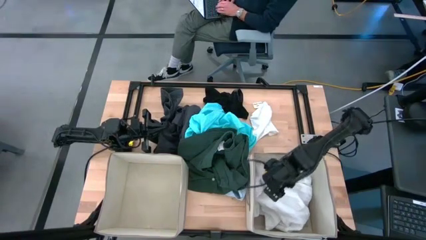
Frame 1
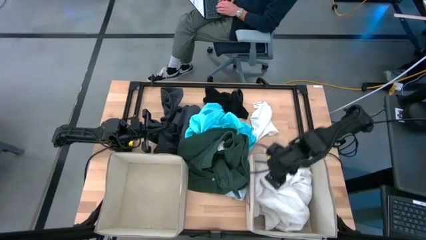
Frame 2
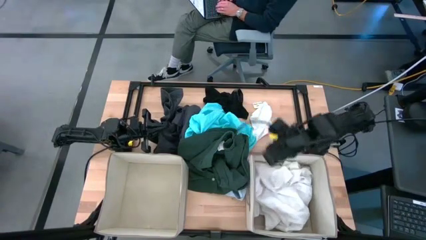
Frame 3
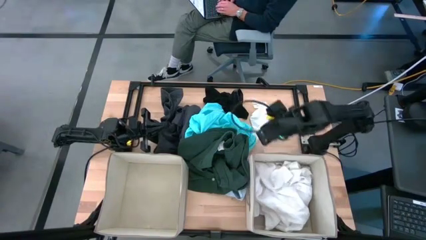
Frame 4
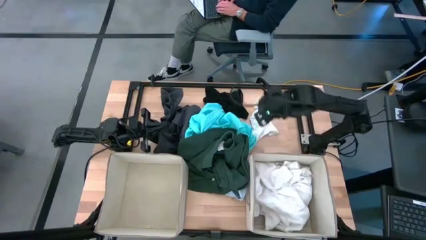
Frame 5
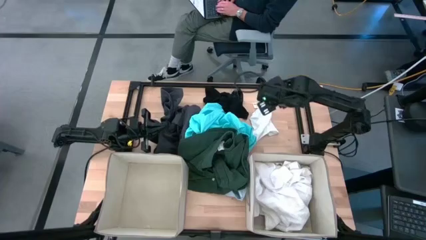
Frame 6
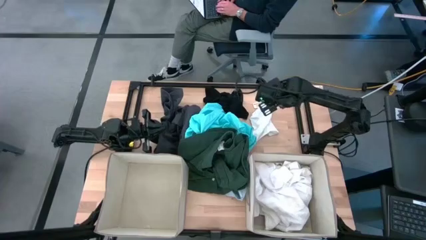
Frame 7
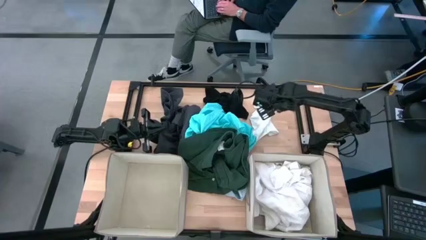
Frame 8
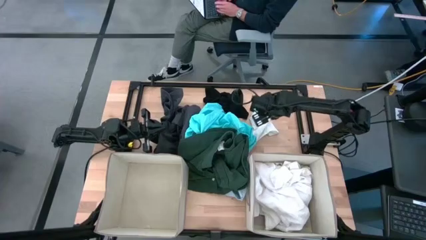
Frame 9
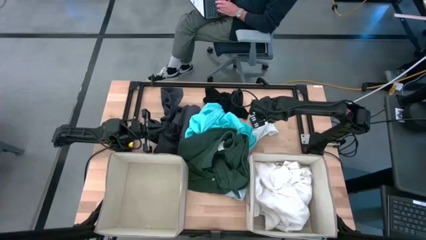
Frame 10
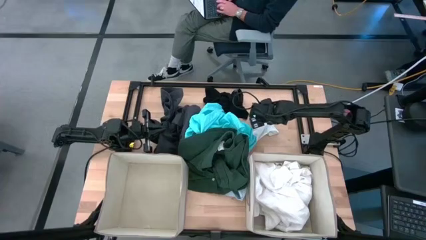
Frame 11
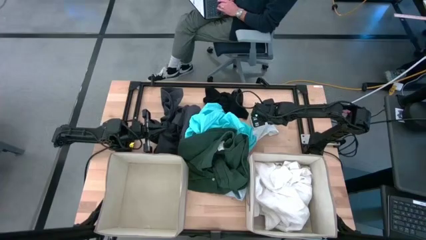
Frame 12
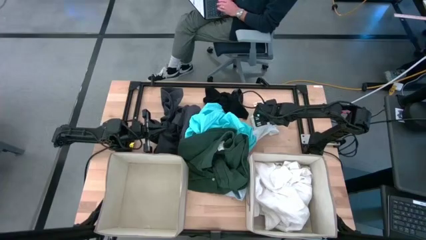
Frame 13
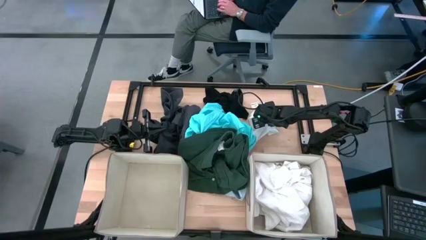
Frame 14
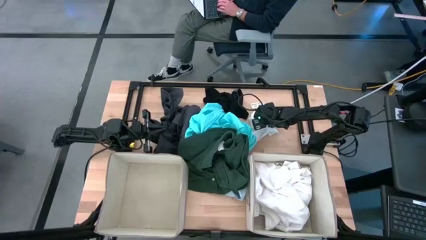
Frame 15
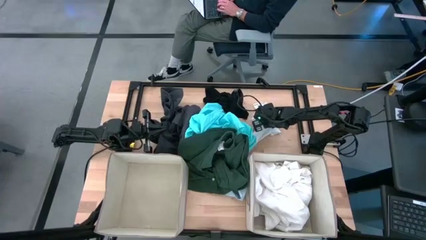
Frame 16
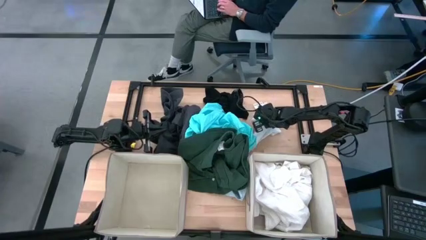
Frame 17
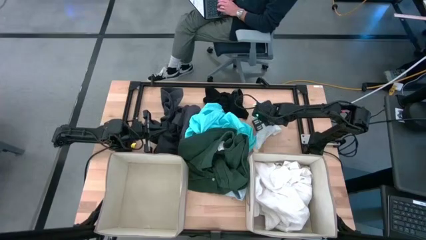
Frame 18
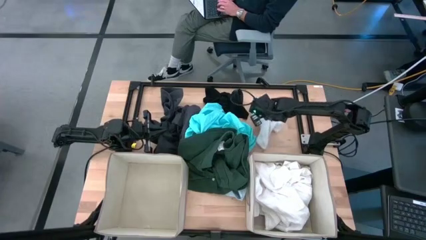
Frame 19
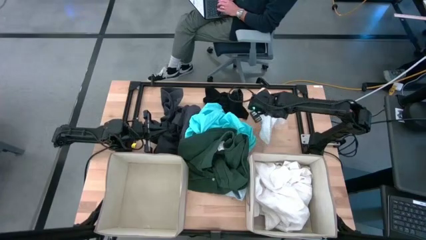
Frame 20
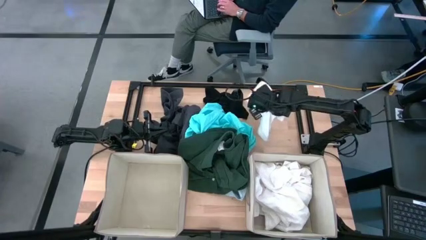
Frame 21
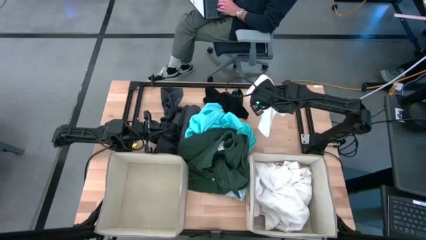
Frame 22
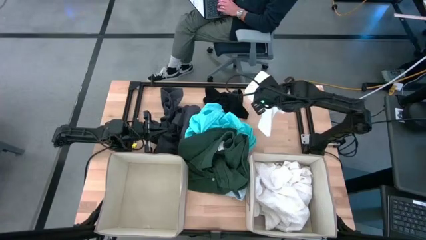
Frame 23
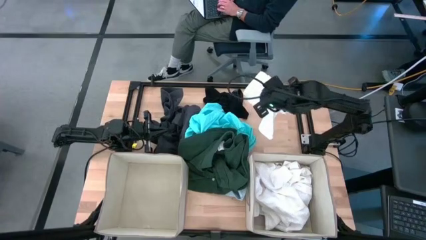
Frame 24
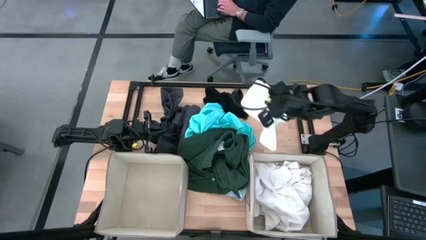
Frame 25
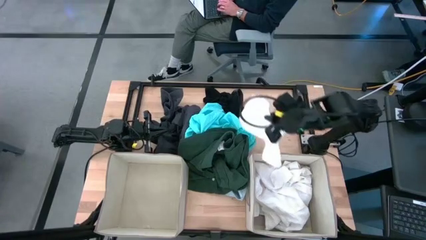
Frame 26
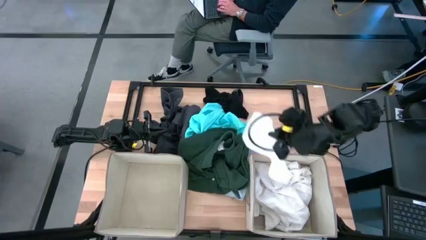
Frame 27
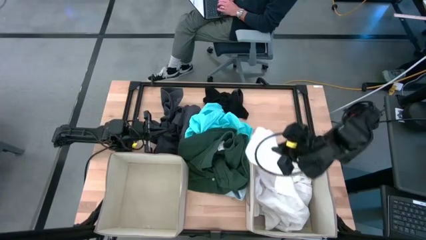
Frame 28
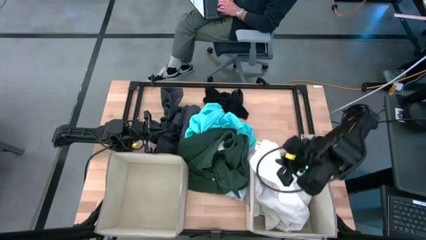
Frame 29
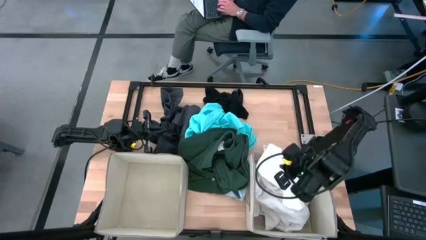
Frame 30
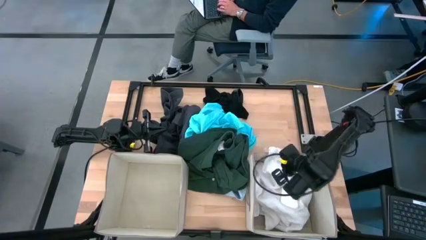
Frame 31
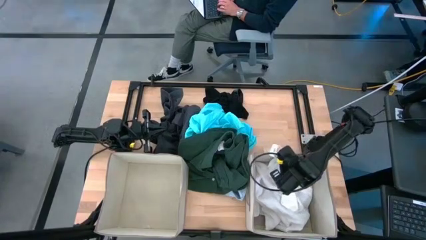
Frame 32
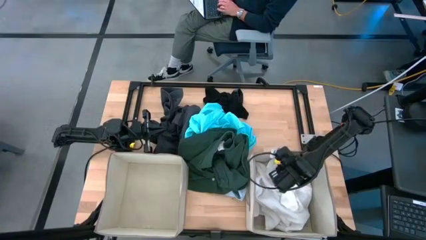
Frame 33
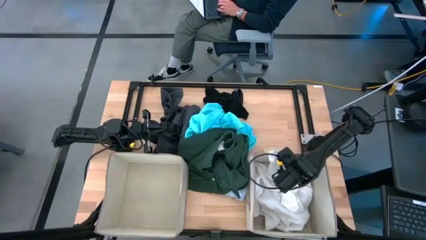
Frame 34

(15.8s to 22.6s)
Task: Sort clothes
Put the white boxer into the right brown laundry organizer

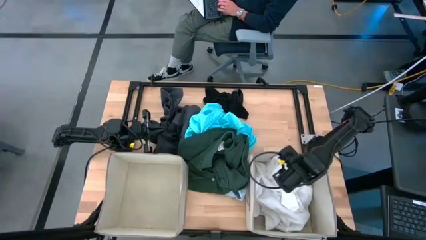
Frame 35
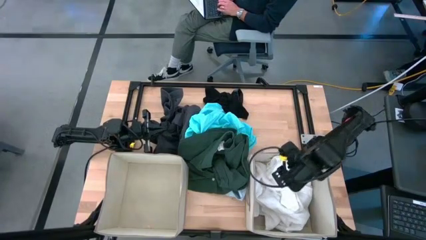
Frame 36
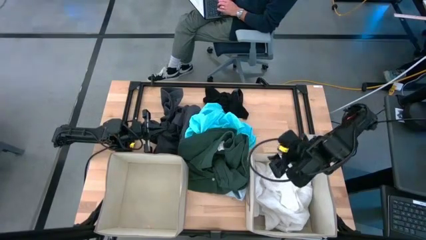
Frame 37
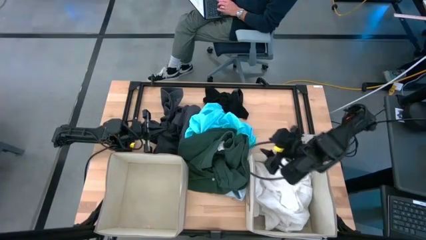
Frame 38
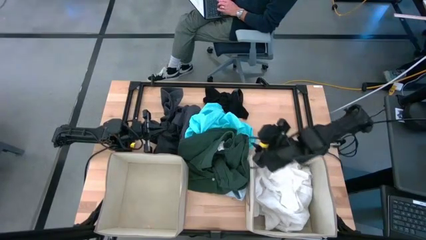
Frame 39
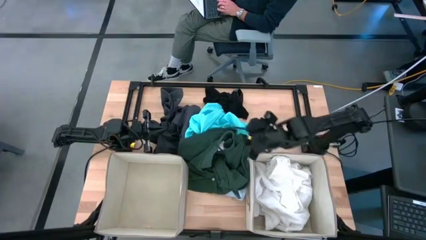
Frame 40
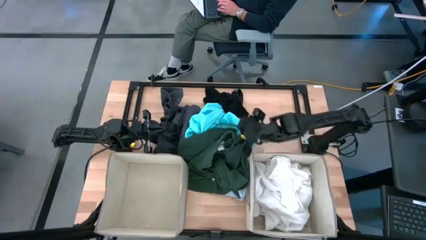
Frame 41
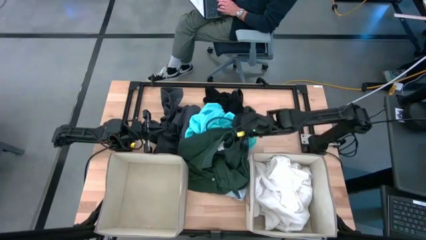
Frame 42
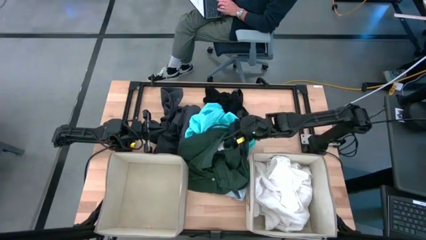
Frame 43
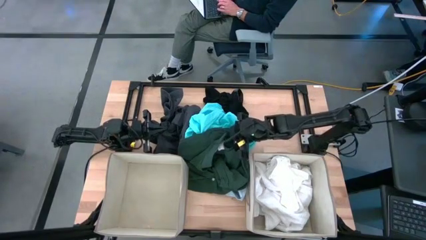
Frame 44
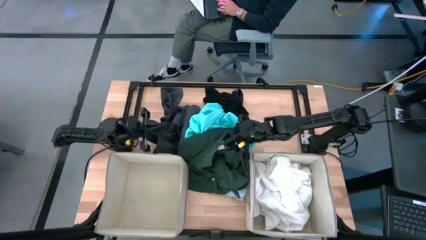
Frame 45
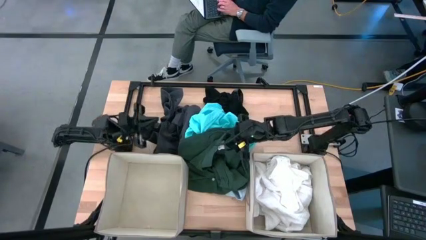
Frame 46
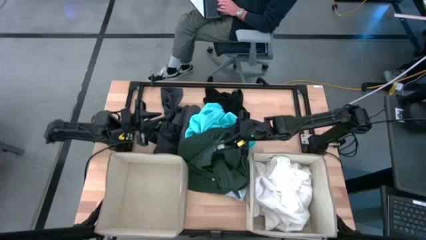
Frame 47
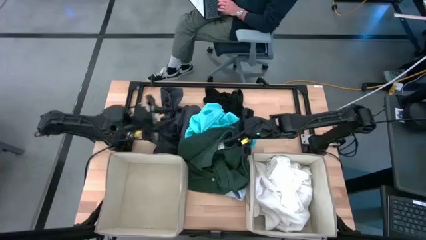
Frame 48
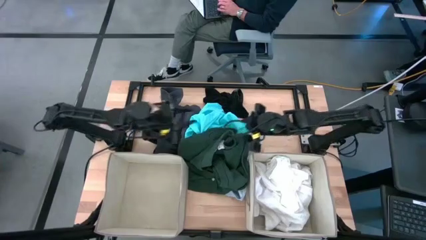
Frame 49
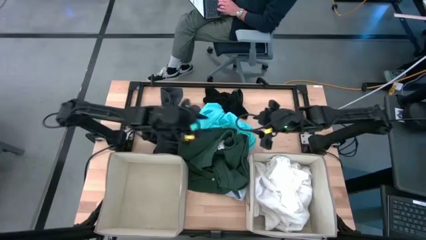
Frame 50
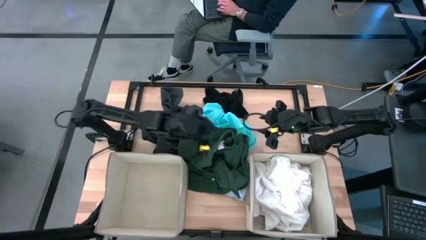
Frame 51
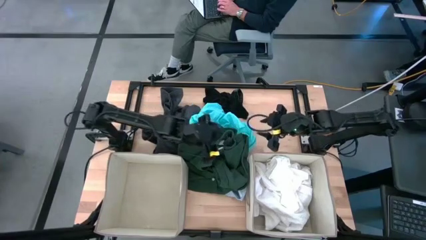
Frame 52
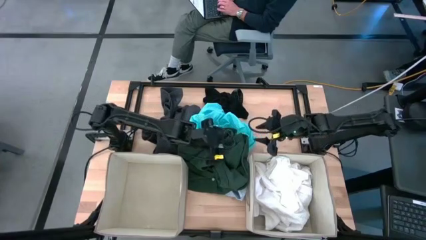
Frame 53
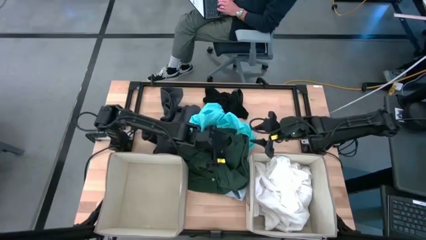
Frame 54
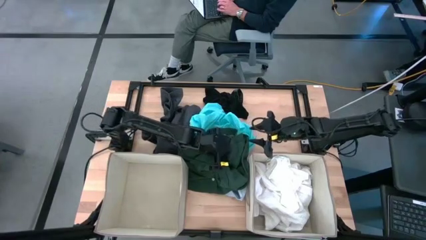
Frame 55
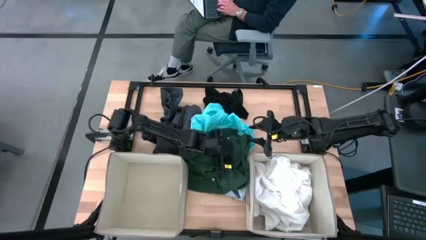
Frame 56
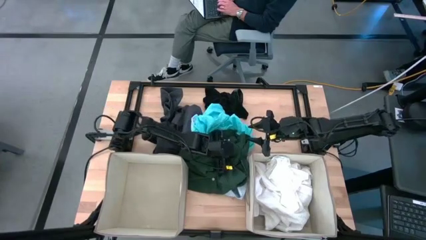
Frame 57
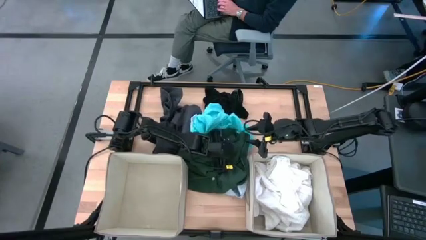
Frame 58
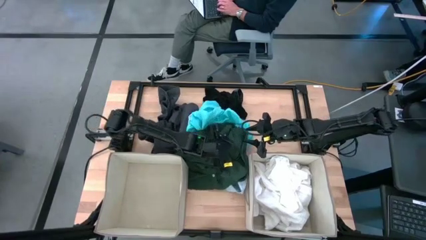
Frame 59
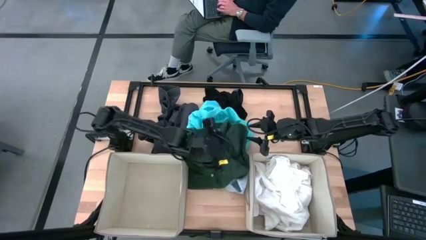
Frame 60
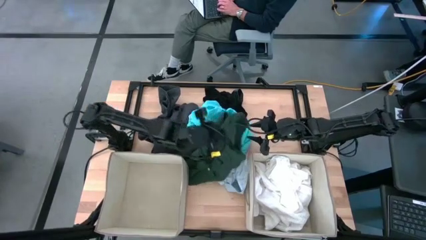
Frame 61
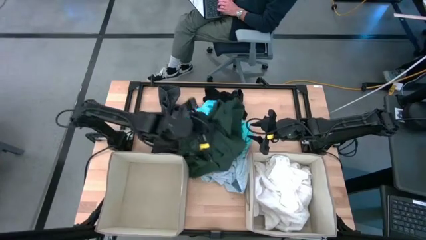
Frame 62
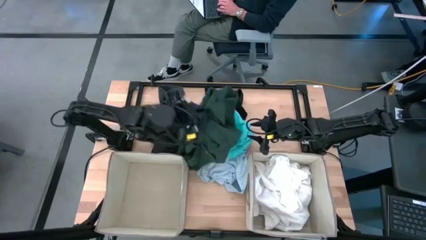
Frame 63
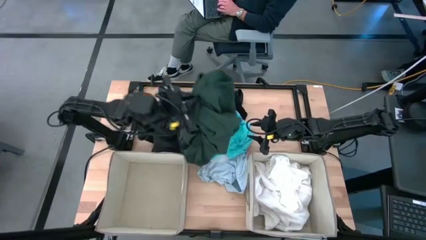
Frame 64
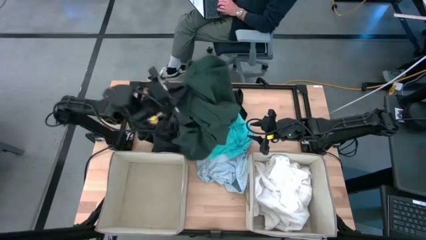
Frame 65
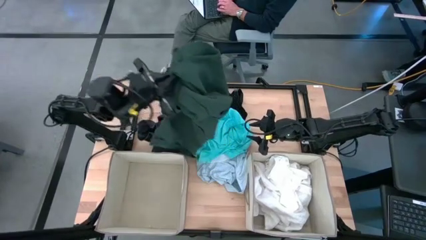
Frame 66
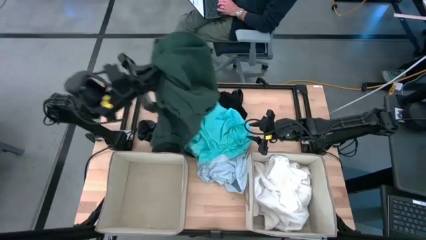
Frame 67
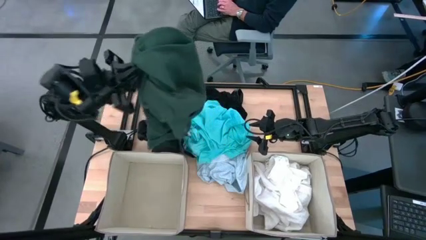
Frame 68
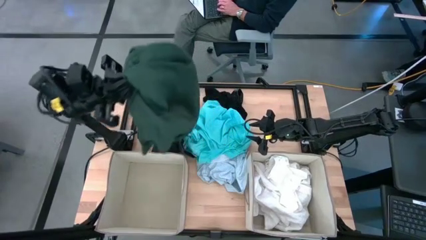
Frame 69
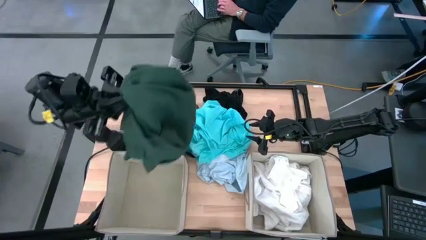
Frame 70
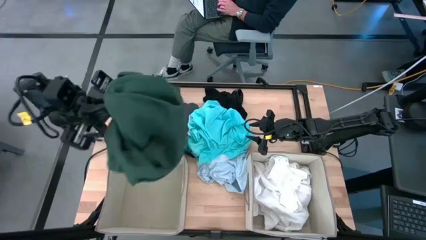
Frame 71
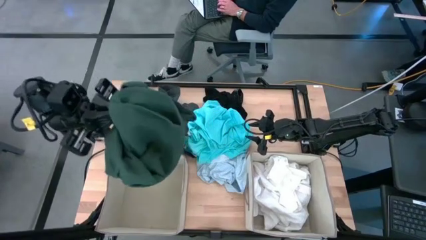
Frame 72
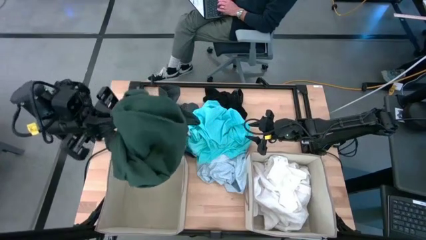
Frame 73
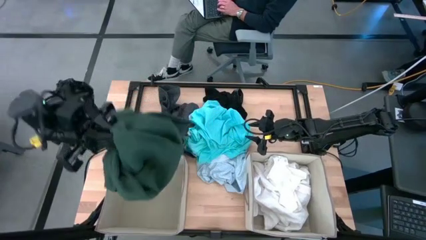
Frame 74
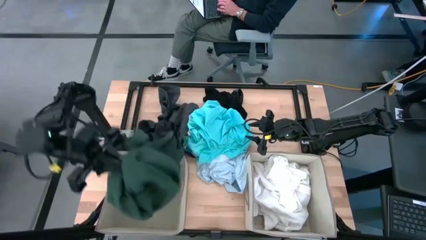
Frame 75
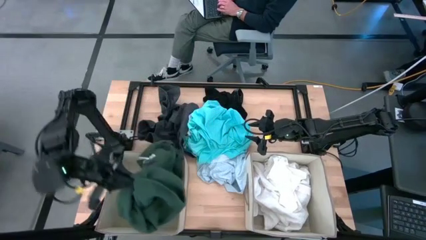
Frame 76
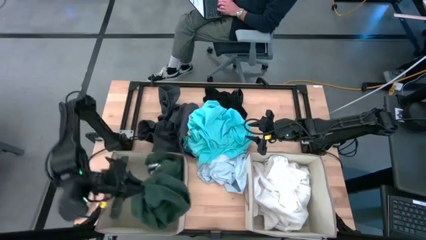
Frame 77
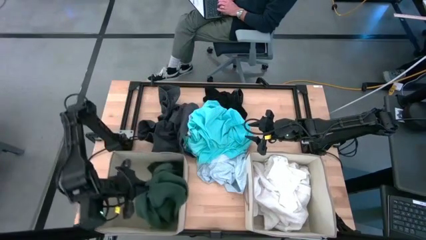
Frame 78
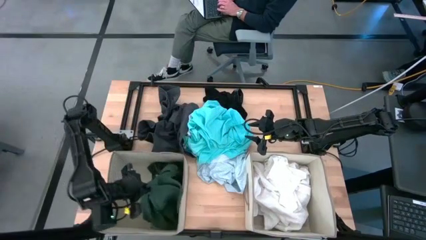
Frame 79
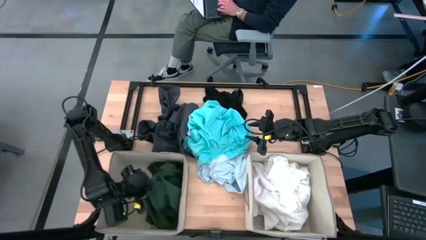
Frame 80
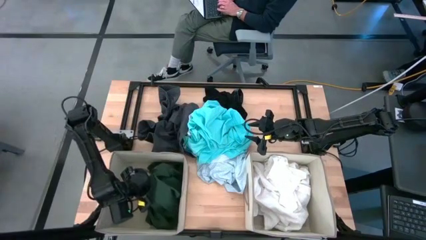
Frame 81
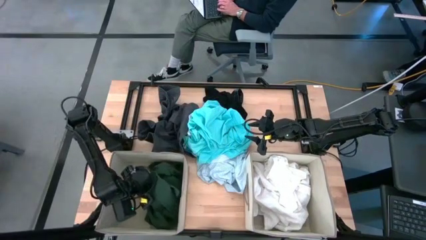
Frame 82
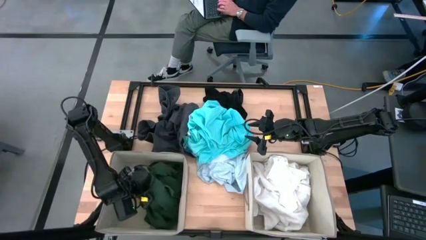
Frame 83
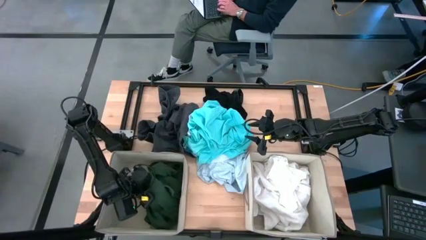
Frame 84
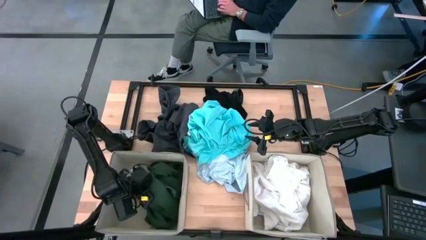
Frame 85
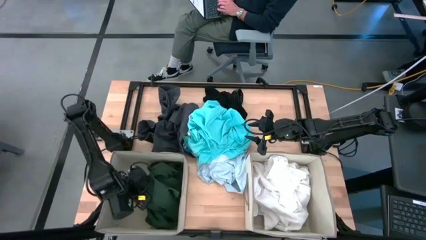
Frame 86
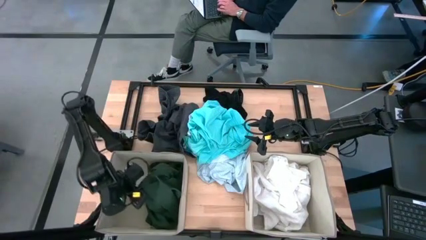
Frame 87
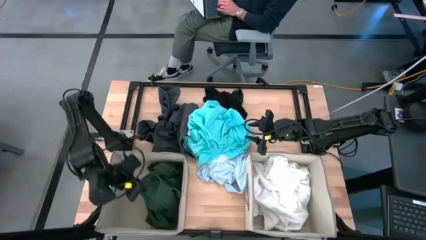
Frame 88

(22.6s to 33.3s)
Put the green long sleeve into the left brown laundry organizer
